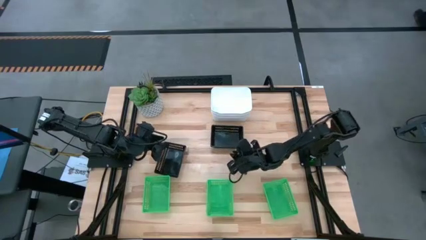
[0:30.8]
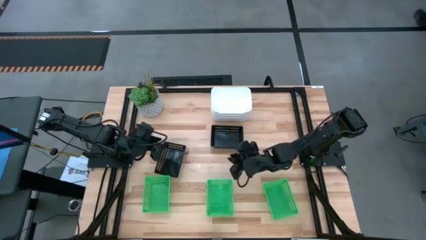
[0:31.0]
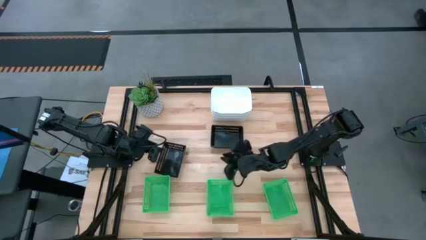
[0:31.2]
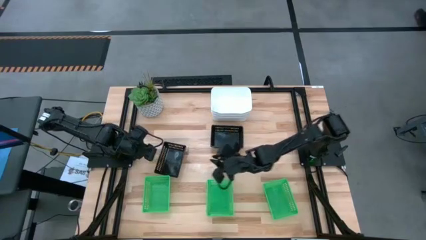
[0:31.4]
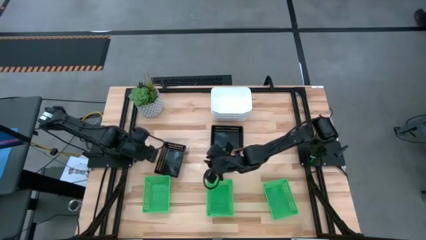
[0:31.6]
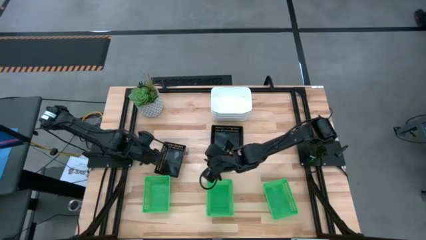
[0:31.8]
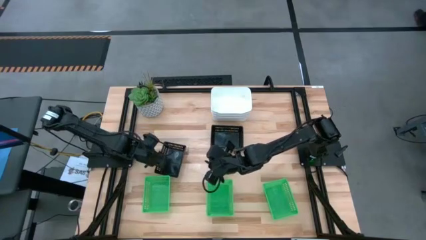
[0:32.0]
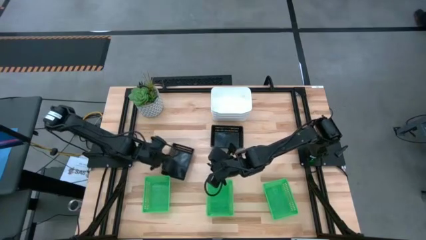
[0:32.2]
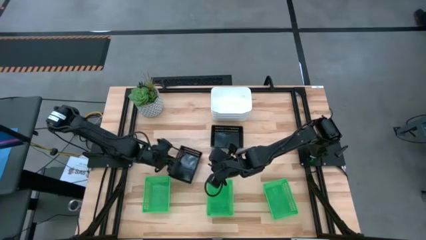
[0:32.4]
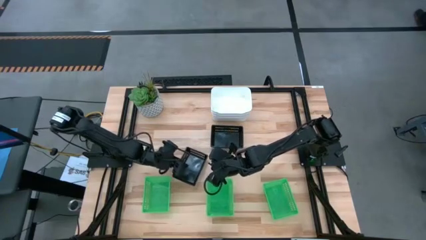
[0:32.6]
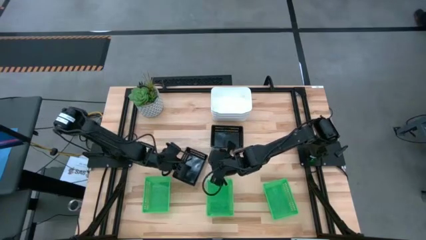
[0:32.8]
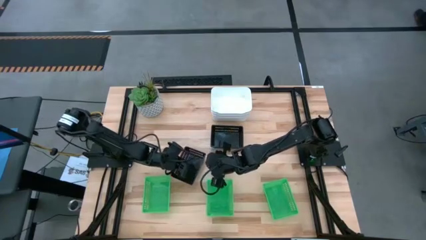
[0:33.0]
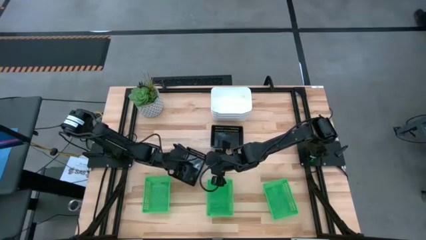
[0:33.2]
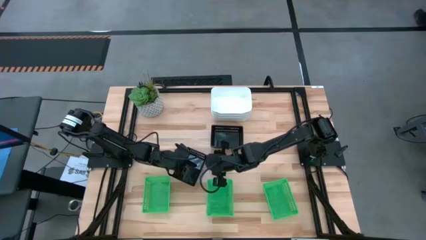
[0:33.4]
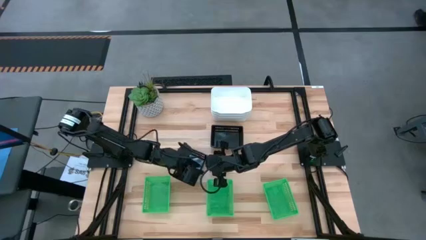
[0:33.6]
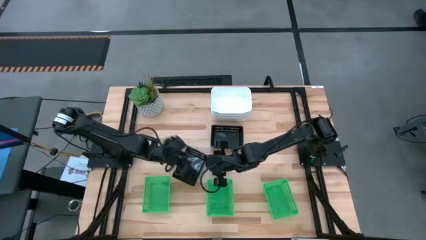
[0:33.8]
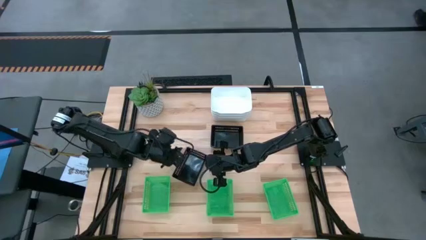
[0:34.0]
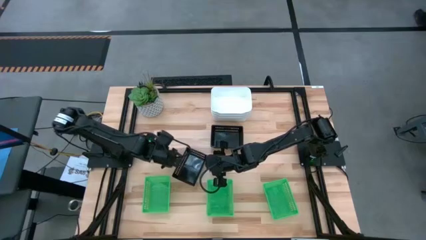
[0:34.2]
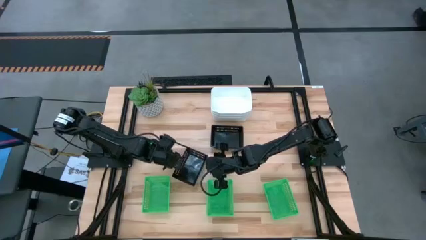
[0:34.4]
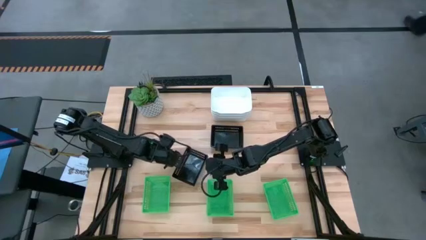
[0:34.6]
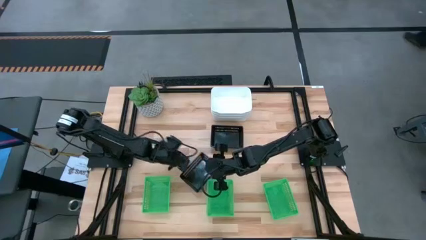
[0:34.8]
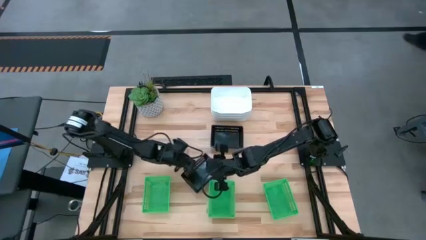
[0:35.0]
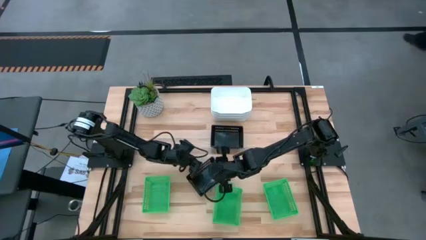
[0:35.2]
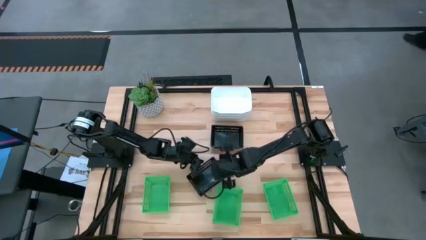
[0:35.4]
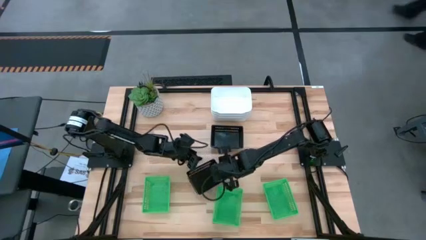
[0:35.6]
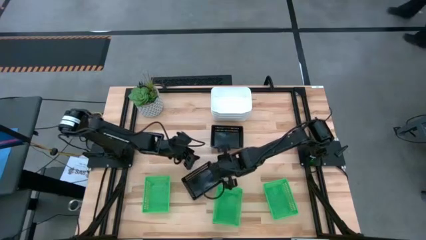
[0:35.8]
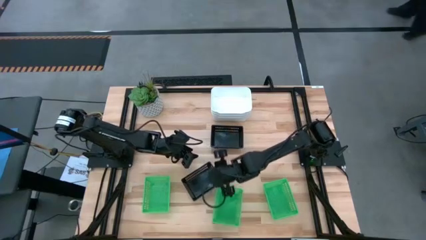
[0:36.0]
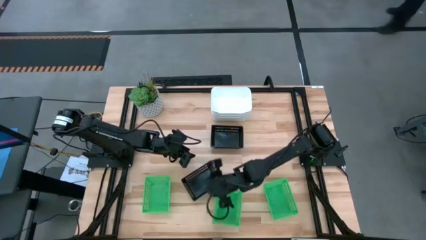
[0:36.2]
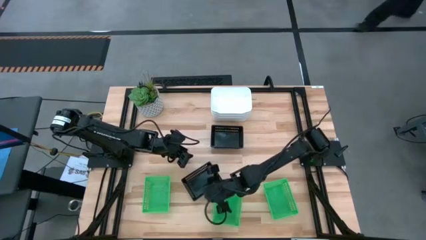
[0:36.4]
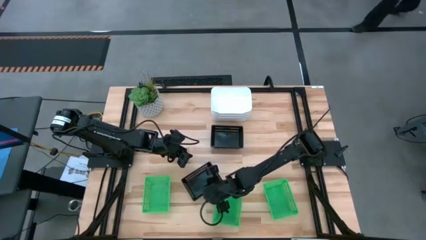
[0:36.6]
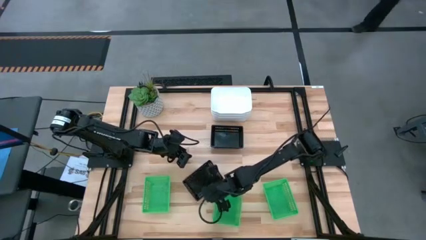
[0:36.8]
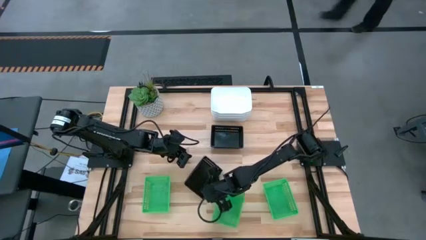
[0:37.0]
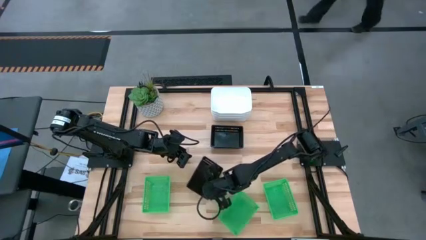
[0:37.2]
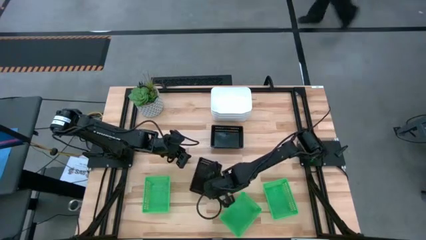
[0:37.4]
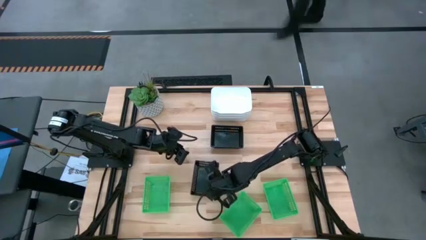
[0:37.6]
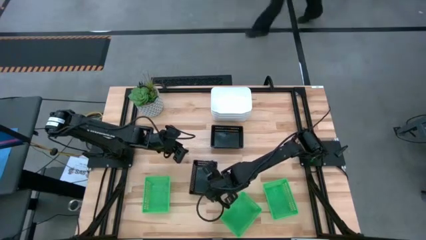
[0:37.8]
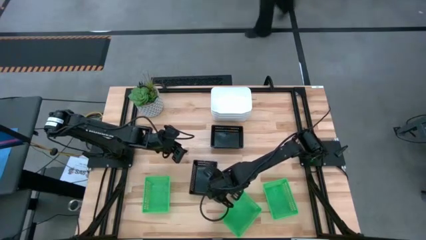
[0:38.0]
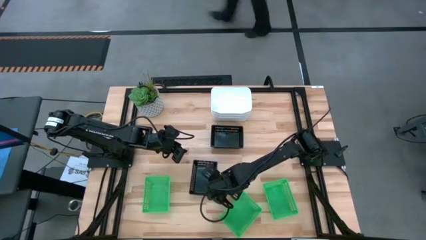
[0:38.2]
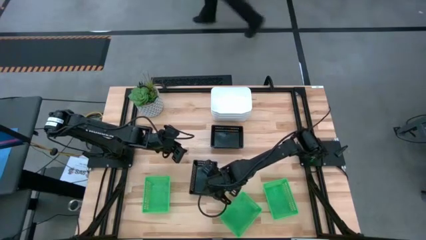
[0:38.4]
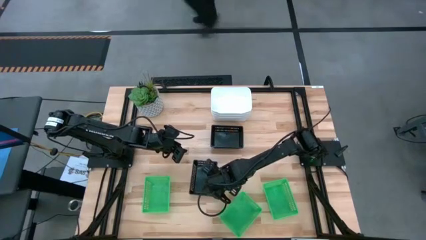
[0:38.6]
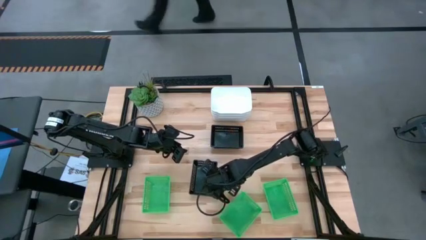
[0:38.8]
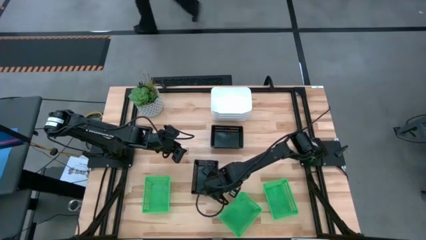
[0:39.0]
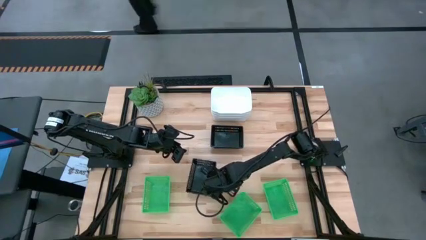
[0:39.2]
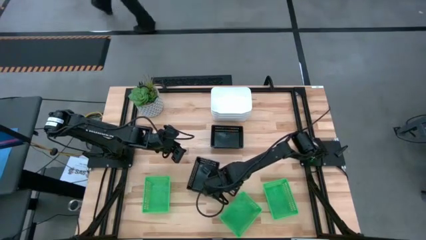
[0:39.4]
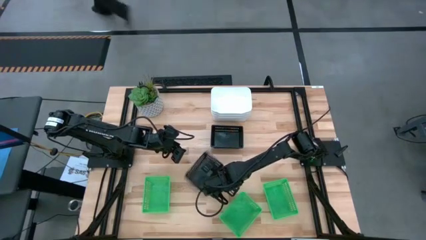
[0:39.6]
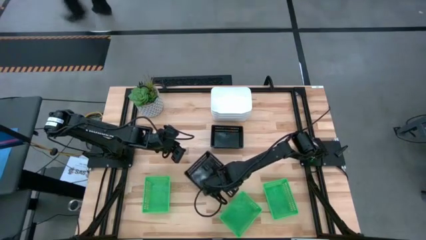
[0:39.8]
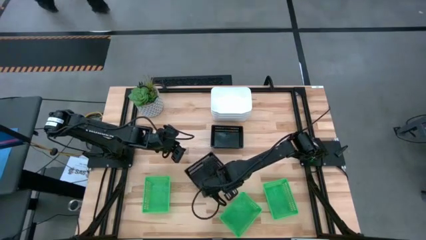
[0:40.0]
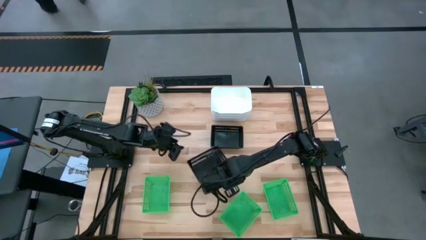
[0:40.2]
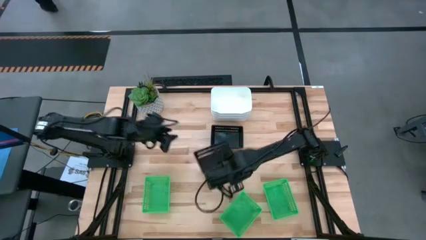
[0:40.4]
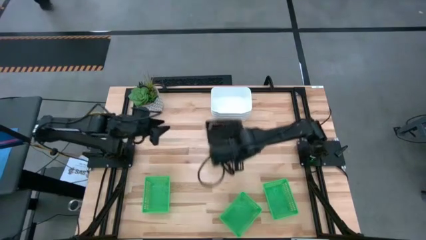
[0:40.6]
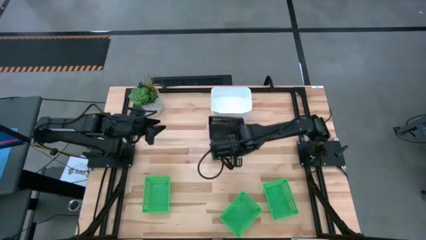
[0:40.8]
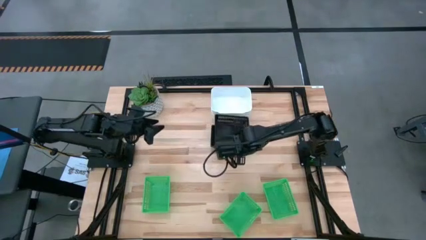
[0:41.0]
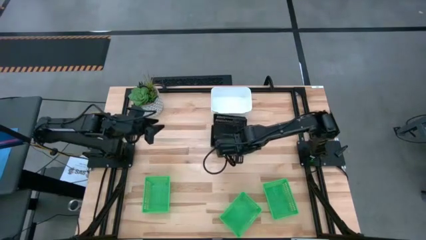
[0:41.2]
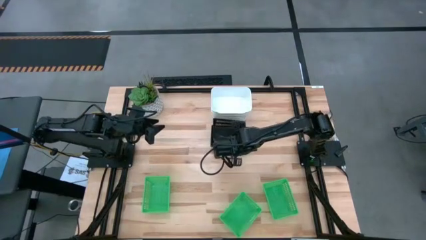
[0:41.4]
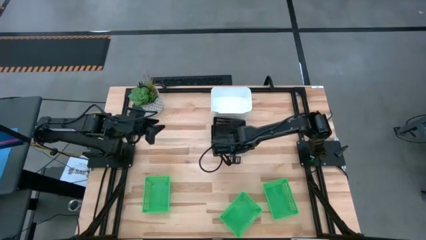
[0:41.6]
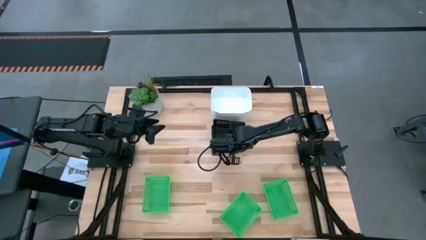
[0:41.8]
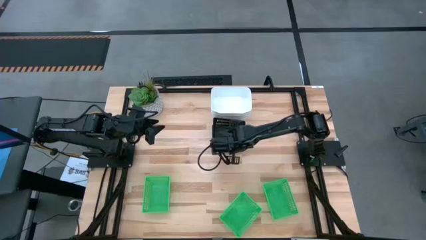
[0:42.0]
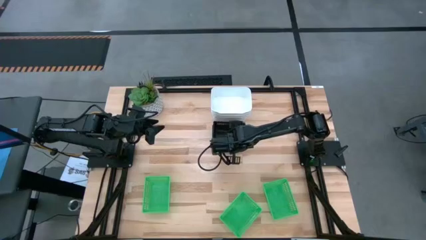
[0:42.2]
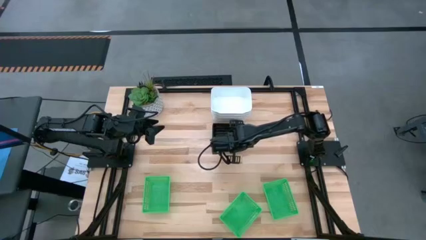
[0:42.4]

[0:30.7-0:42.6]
Stack the left black bin on the right black bin

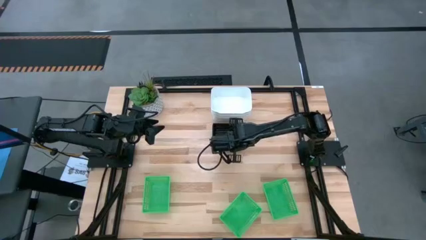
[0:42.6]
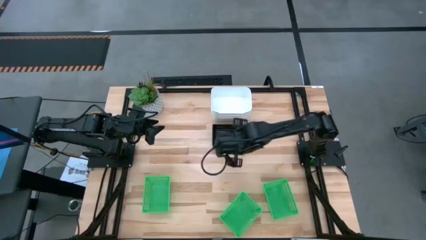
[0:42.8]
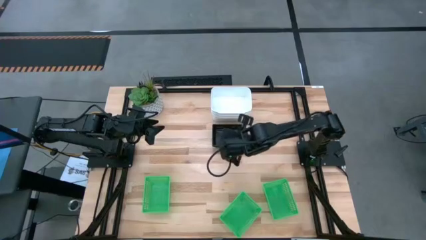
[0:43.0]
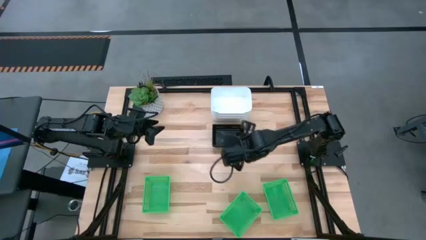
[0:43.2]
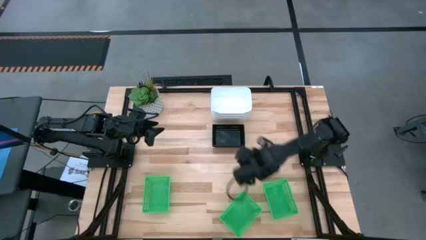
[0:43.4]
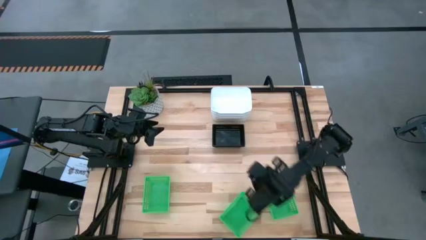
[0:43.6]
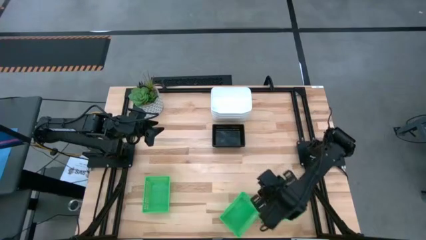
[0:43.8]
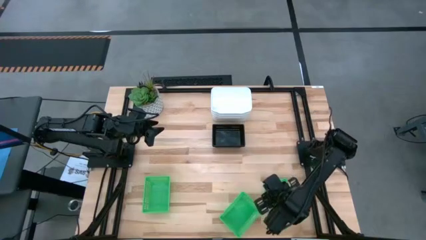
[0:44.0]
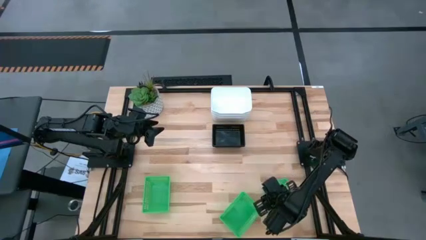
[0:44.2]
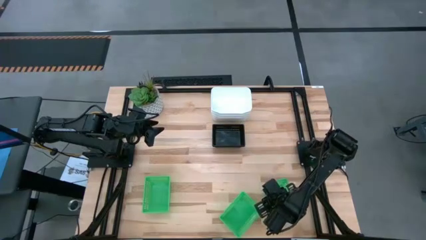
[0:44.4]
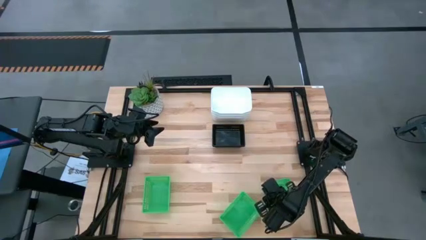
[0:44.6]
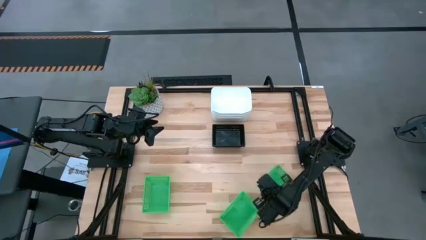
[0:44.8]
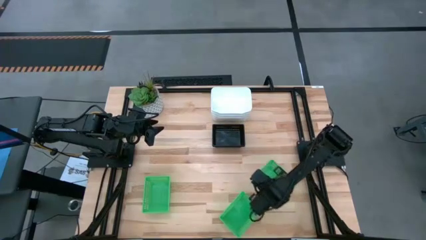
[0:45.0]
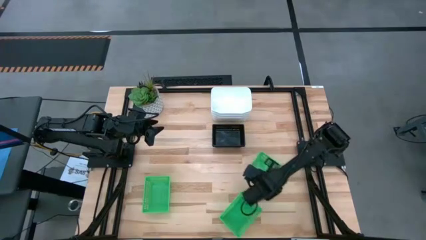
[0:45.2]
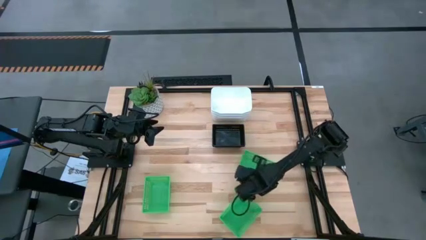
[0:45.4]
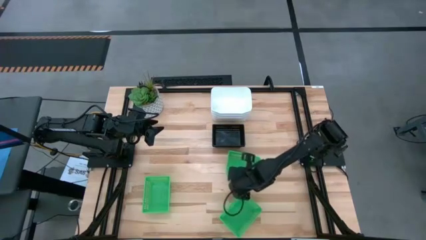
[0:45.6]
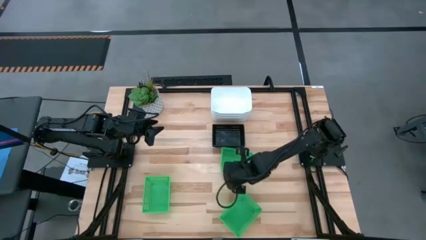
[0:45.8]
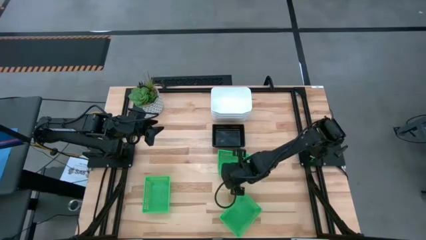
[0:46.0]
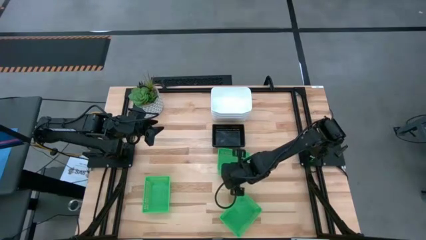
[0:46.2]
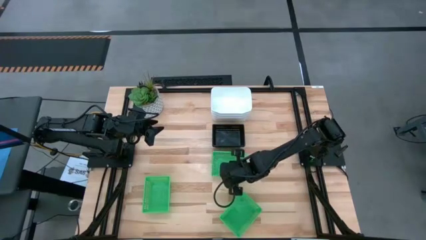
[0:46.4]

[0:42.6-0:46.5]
Move the right green bin to the center of the table
